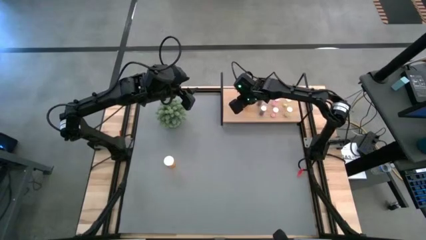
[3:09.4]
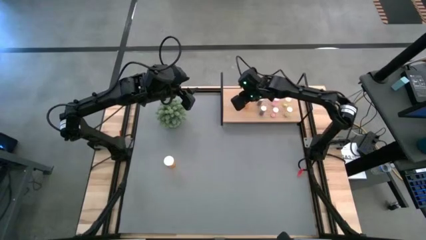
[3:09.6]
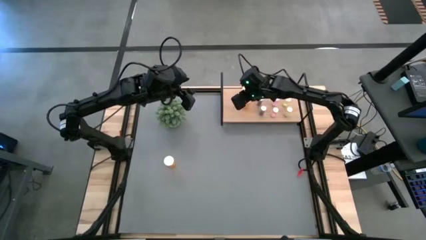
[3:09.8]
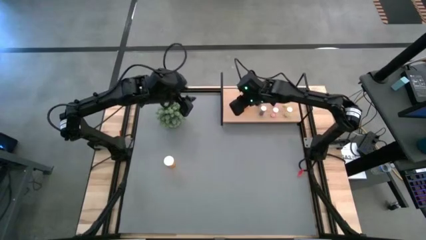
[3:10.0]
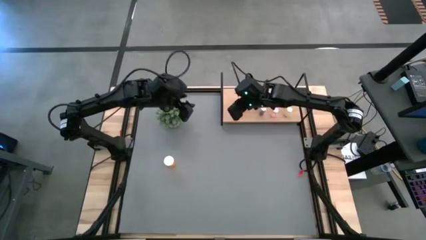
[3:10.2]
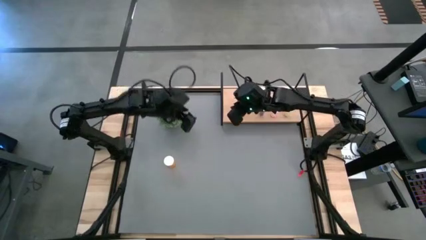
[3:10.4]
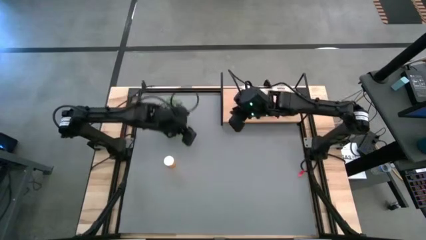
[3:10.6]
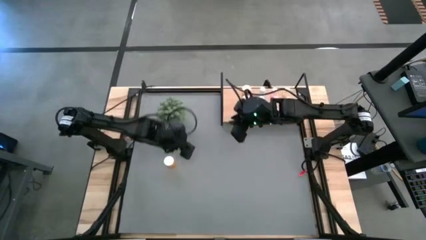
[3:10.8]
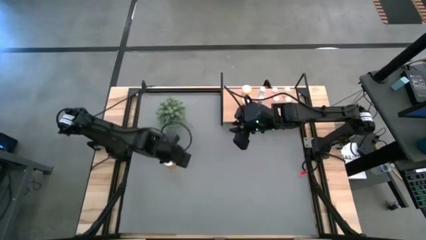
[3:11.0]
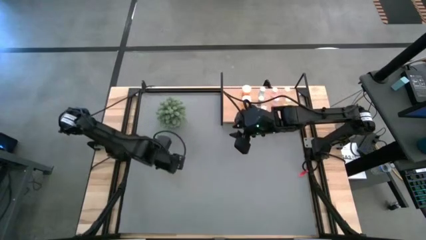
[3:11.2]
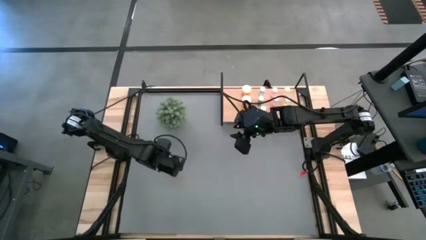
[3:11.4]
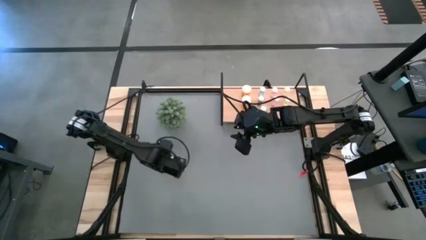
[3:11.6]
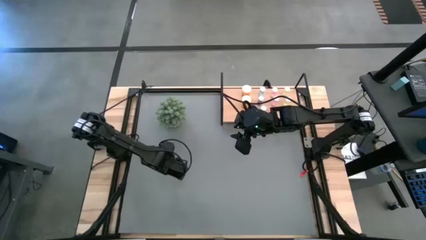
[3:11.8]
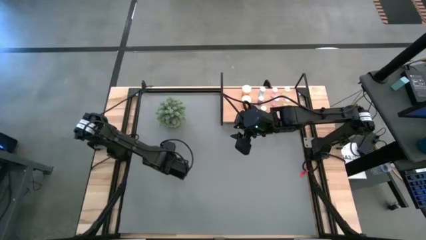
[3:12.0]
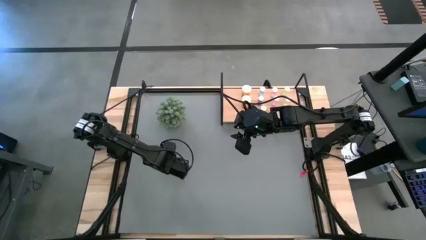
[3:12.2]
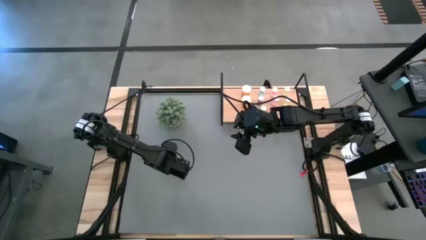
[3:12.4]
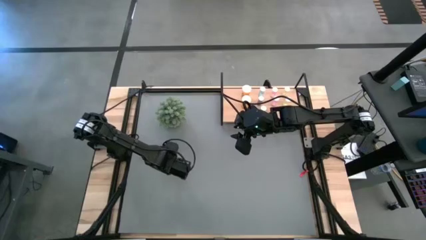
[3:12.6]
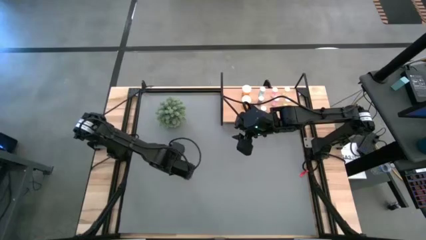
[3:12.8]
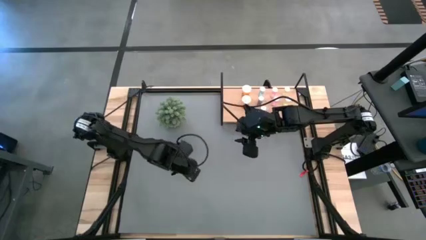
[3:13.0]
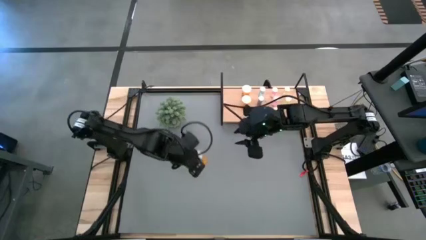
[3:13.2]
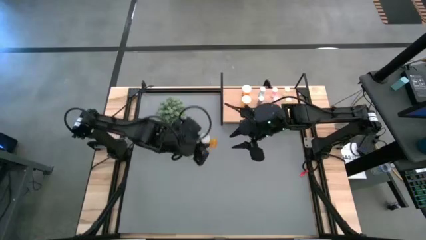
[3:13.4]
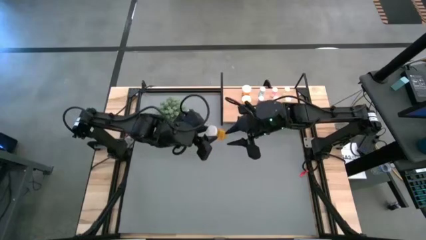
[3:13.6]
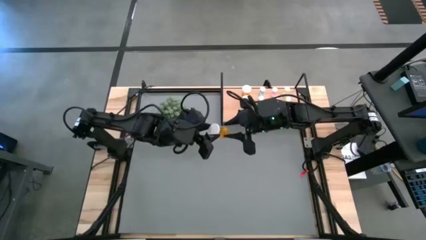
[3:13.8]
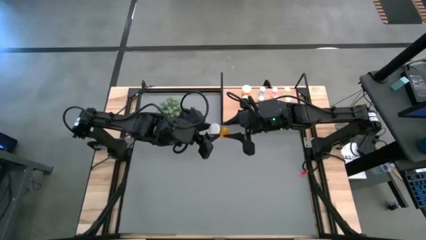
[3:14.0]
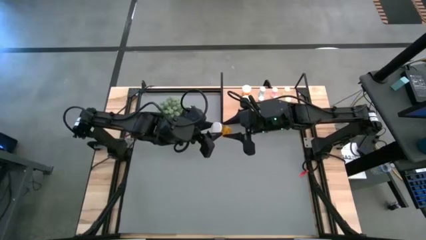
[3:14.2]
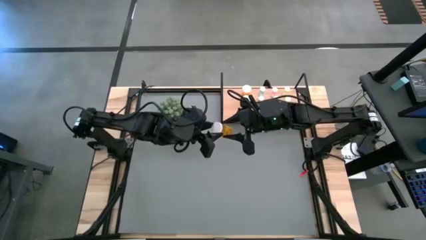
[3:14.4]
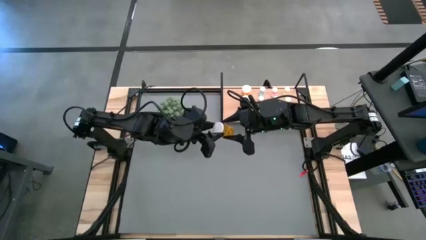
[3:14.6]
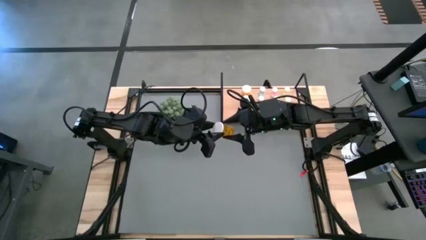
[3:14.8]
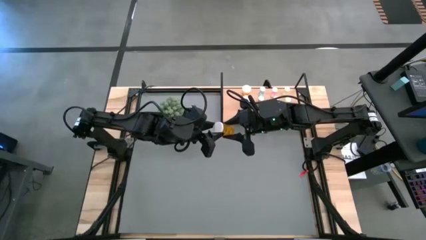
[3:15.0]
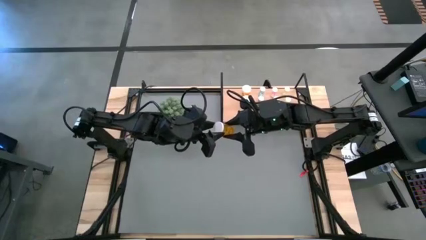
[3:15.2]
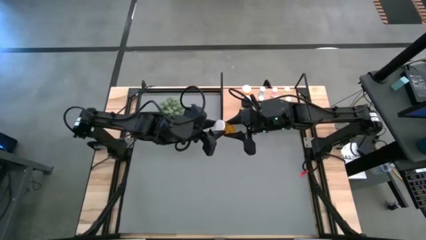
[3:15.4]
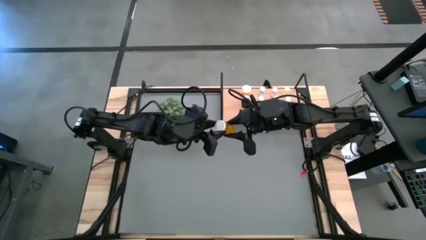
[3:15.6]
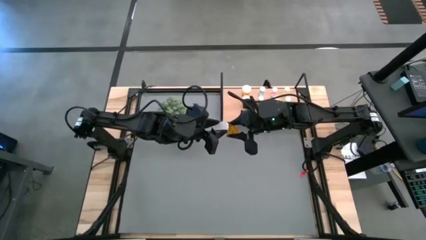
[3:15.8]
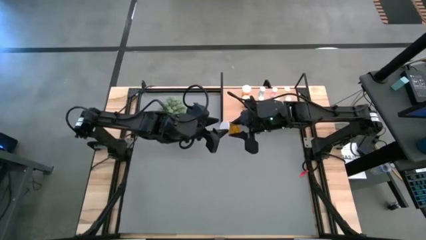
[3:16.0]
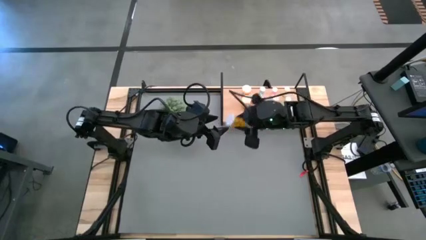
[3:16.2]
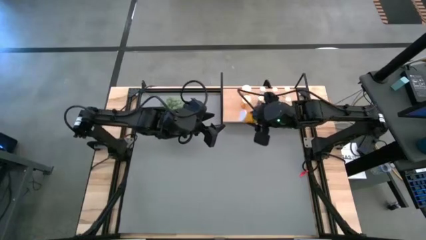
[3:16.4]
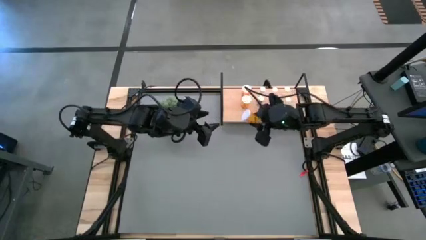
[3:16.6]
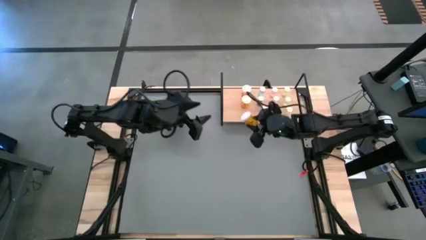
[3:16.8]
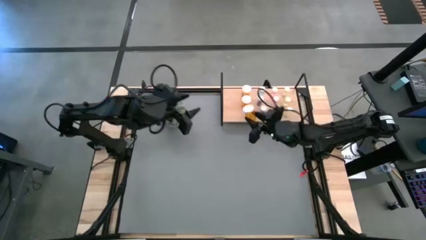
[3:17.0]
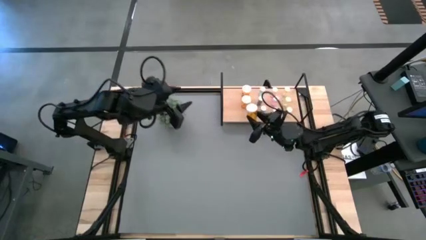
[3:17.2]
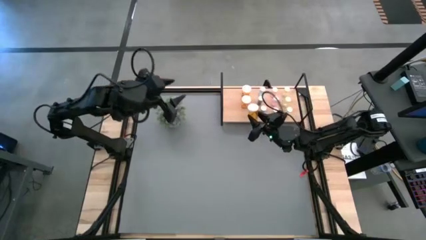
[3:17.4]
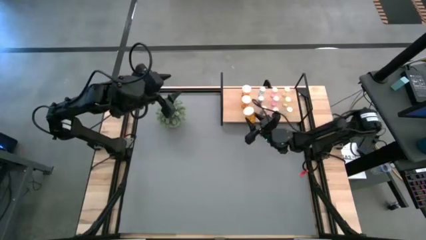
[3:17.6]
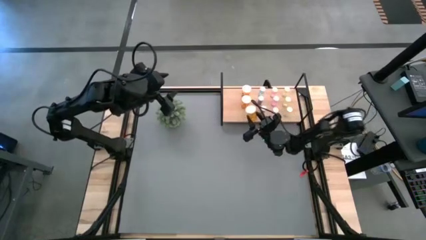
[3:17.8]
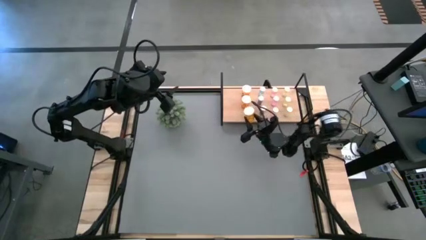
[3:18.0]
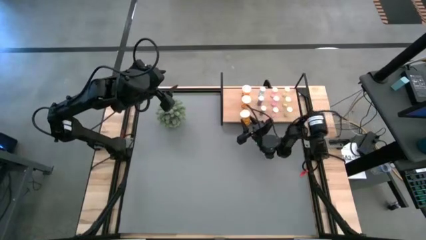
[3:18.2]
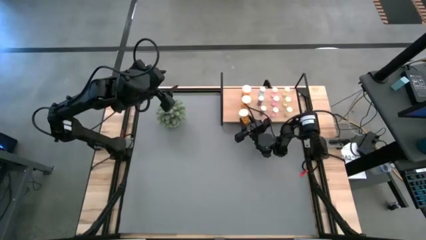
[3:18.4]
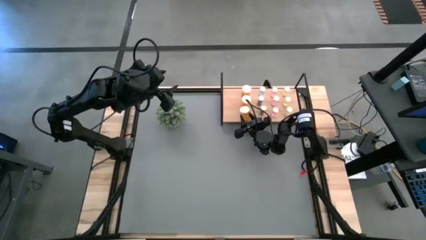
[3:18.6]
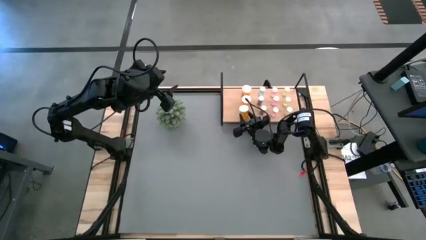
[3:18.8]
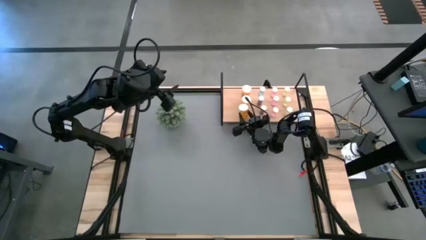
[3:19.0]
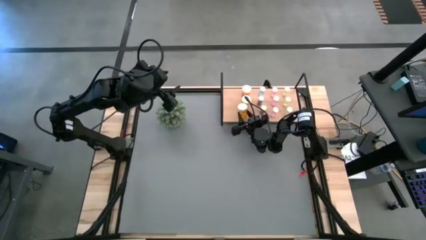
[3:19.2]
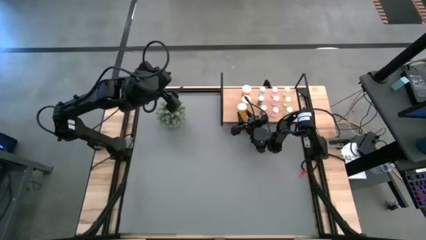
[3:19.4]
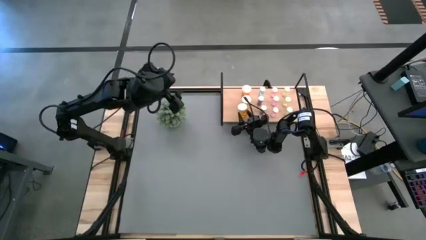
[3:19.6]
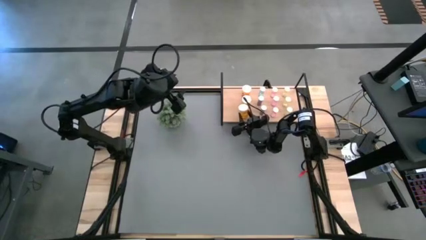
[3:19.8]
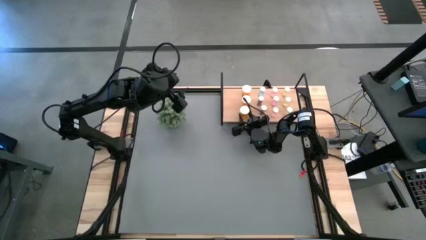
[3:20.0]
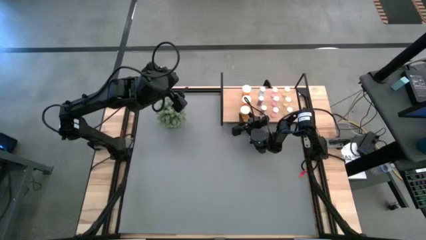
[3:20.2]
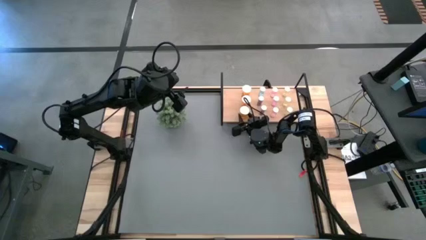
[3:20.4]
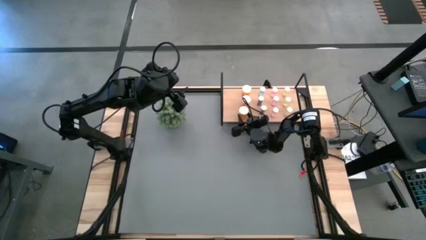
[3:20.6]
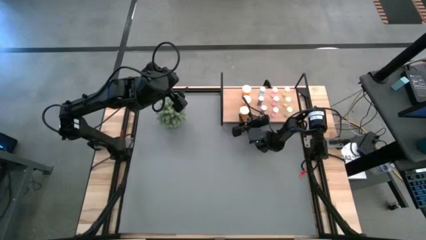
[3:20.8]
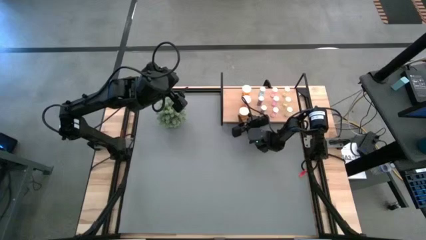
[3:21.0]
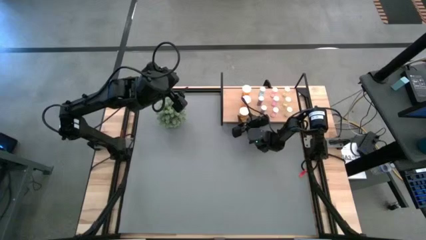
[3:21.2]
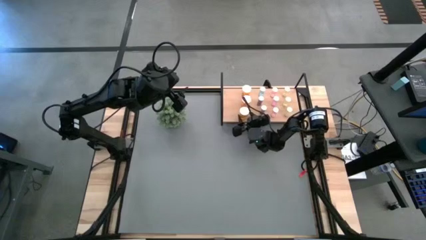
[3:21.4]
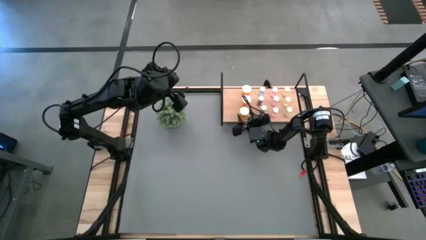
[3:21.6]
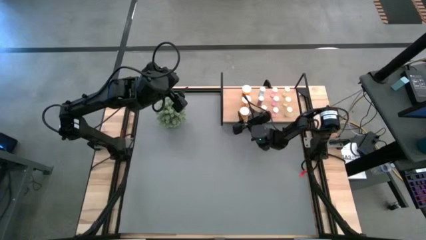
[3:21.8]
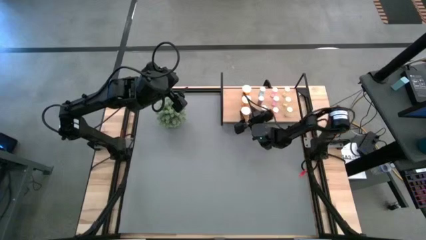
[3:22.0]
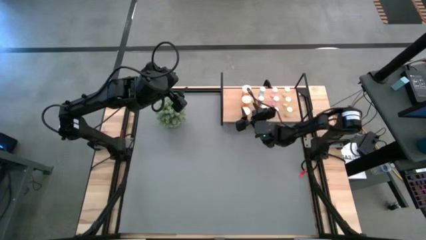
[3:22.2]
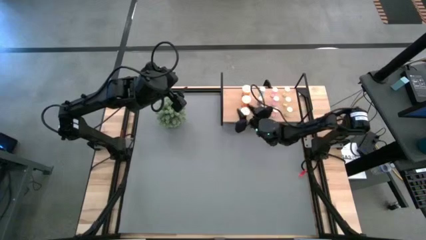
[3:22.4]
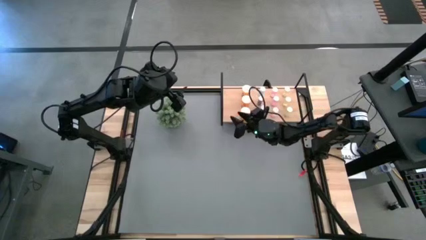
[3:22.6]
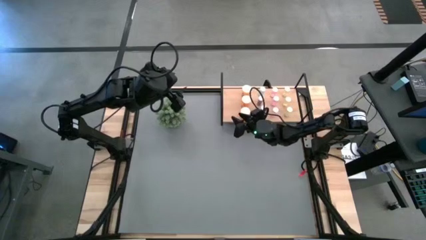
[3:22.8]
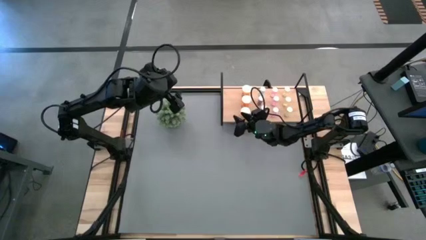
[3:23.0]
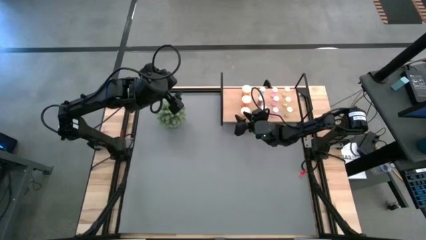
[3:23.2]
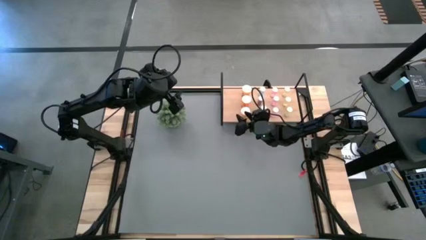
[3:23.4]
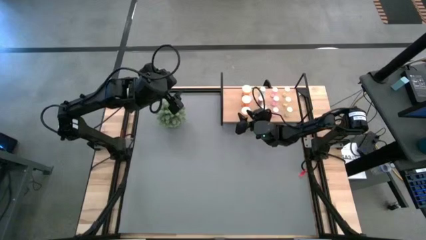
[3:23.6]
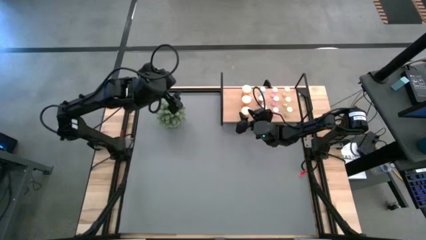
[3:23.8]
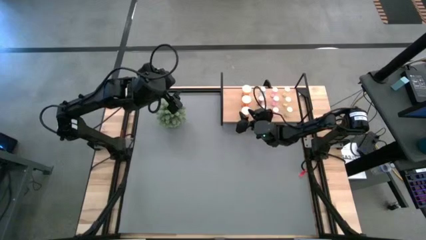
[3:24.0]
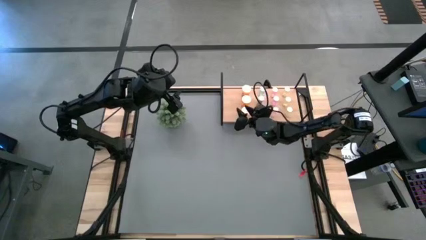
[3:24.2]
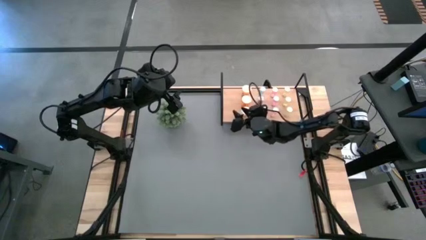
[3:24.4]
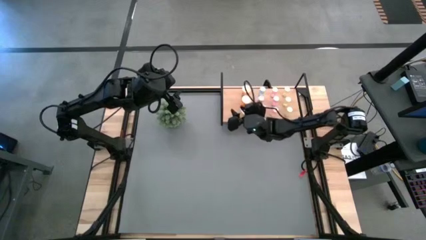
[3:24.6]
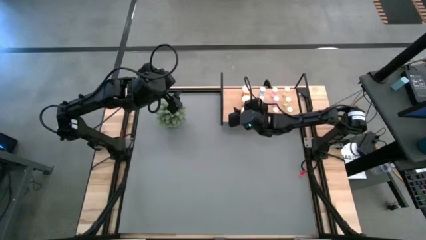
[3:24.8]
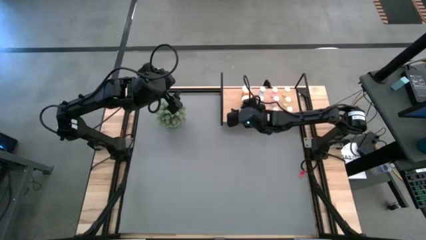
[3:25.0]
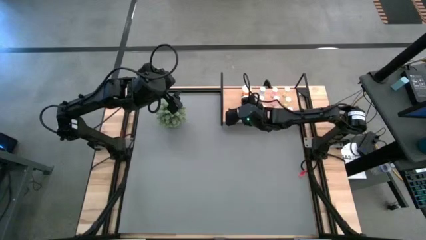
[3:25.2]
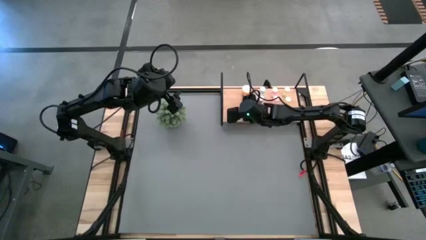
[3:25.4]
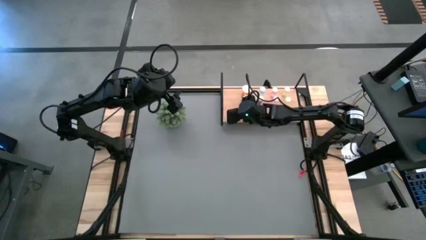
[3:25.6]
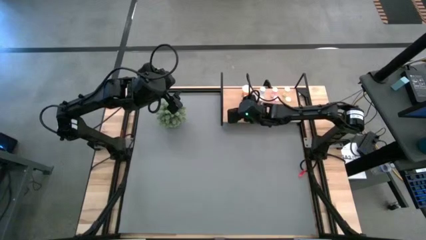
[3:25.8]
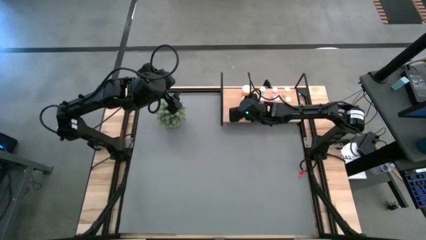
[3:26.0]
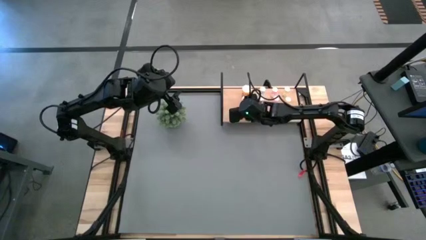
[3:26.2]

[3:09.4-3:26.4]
Task: Pick and place medicine bottles onto shelf by color
Put the orange pill bottle on the shelf aligned with the other orange pill bottles
